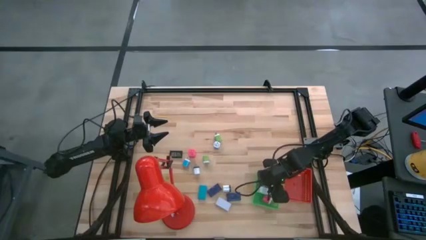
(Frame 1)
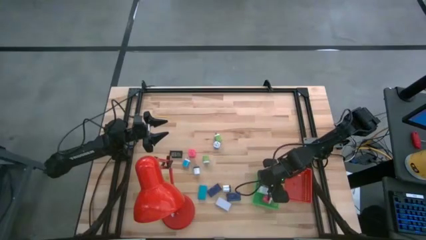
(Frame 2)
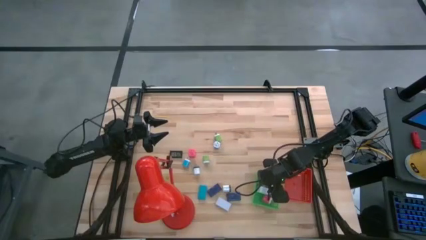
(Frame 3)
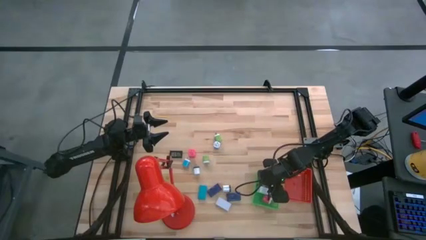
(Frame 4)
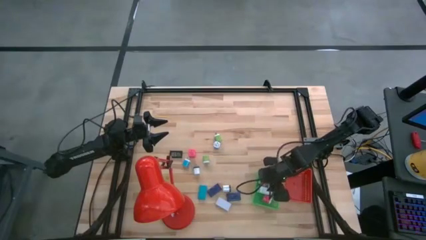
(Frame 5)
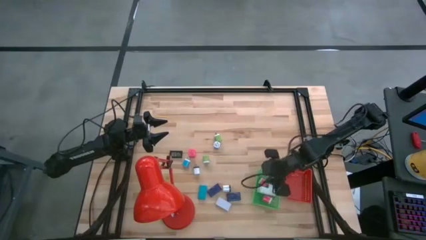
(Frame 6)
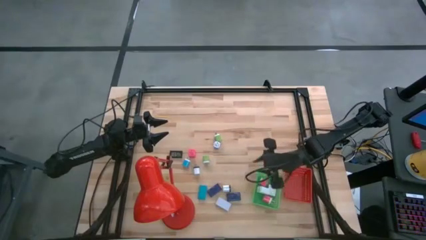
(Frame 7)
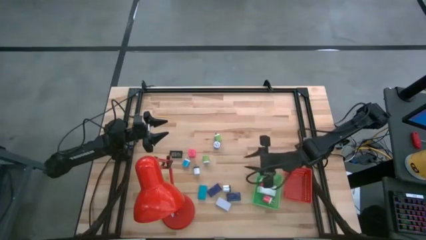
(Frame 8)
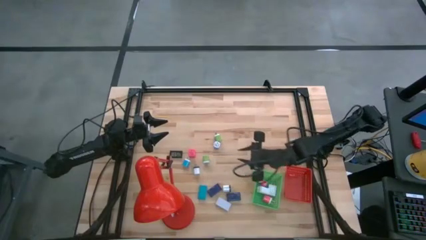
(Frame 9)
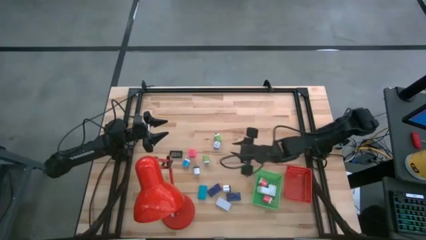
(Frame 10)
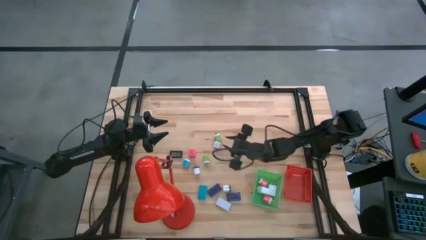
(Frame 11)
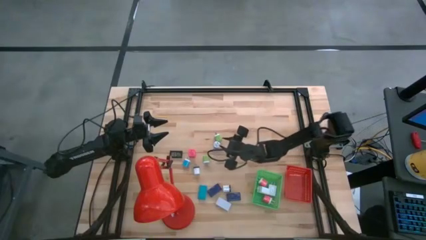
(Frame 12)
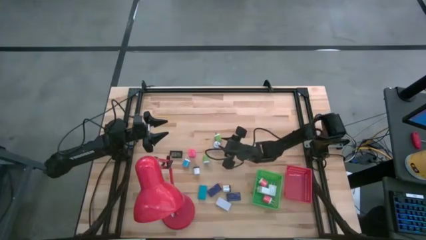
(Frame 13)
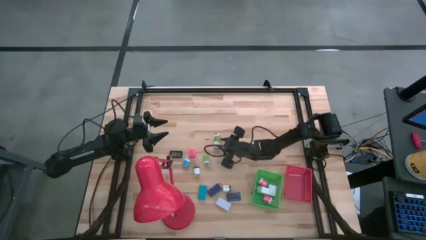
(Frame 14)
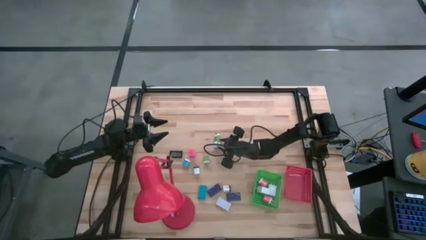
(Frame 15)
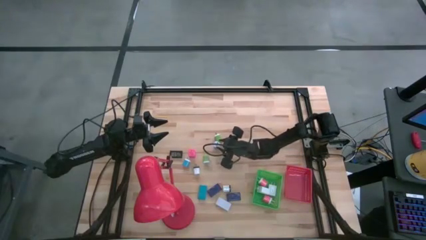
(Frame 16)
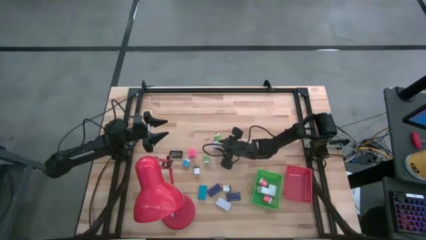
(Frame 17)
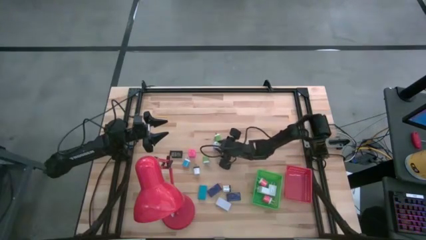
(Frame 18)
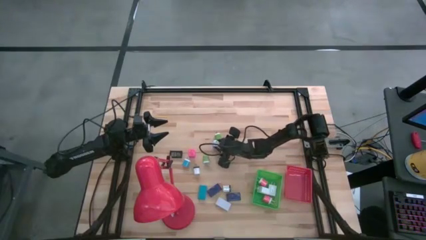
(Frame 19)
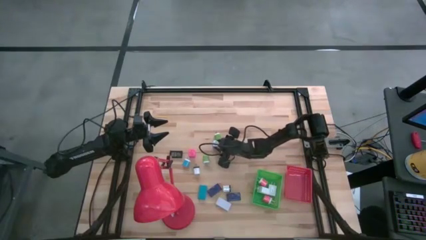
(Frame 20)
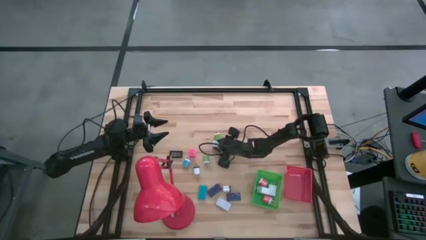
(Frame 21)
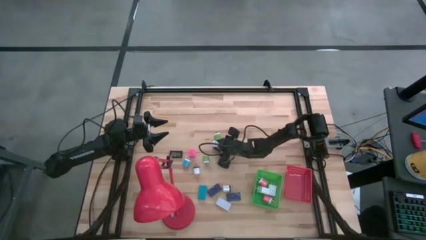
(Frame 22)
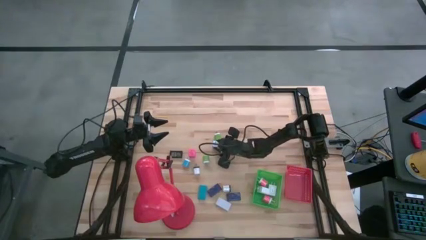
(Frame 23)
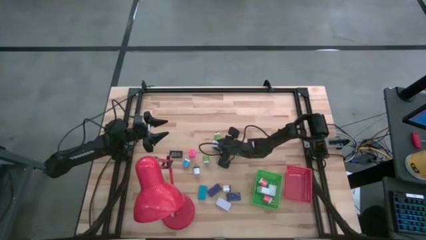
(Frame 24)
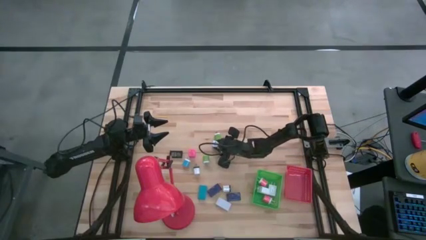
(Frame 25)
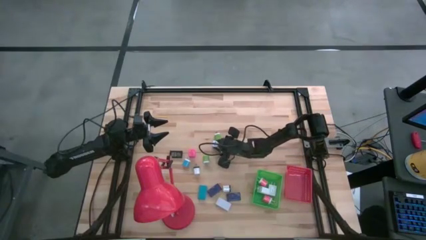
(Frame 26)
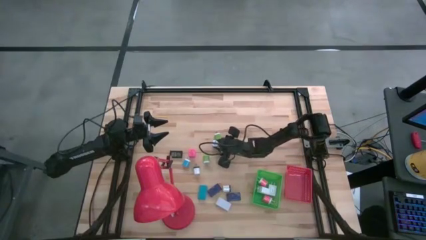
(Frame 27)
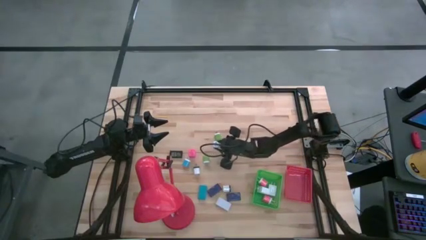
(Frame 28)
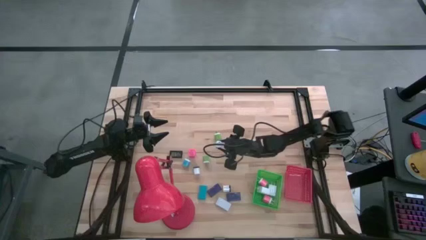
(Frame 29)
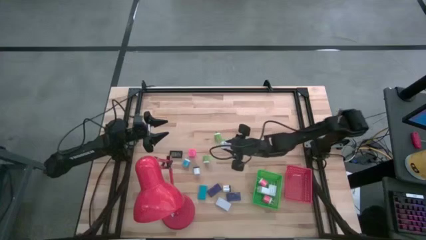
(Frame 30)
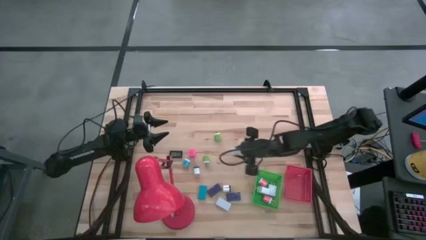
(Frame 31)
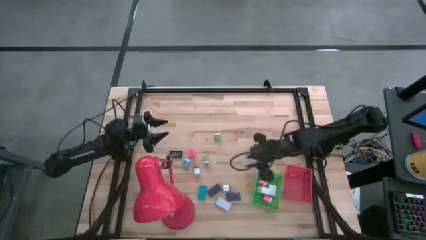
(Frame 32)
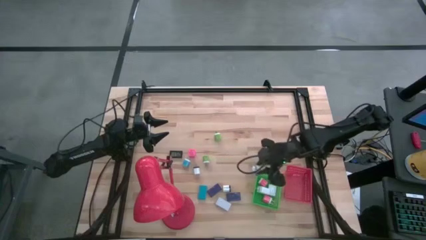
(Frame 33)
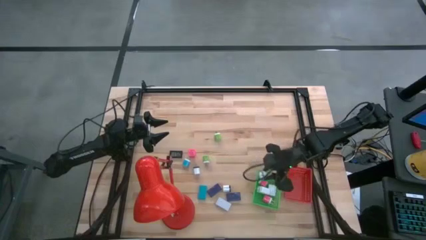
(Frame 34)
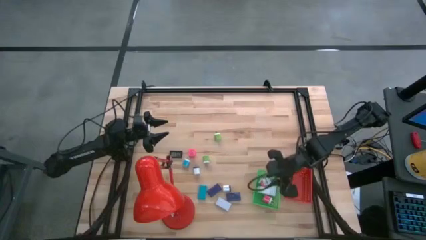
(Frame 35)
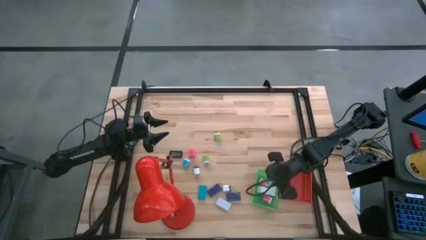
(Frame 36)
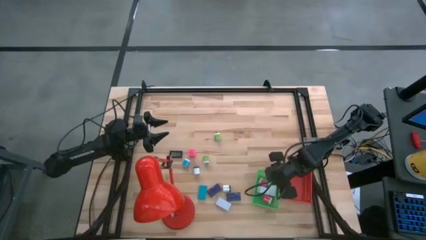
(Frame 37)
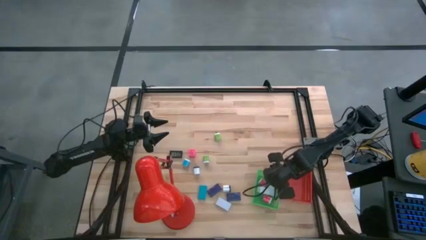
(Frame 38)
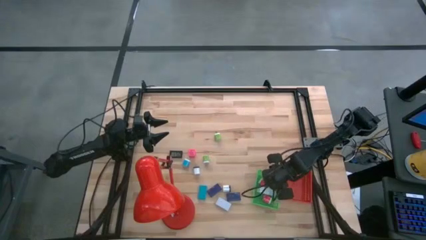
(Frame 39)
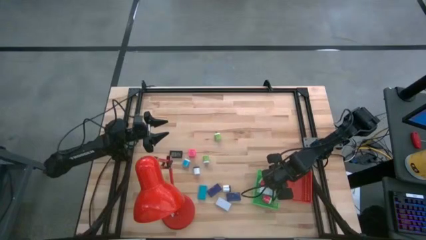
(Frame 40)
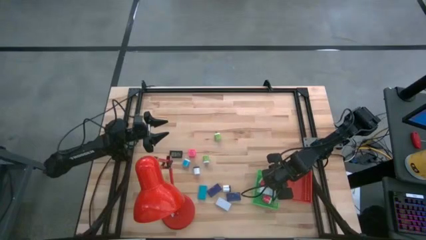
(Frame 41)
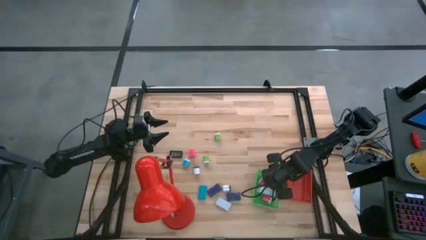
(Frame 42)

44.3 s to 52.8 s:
Task: Pick & Place Office items
Put the purple charger adapter into the green basket

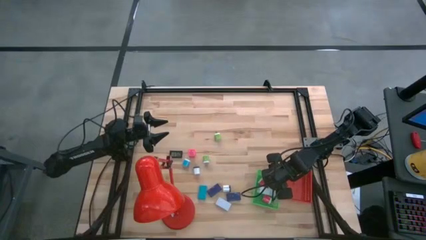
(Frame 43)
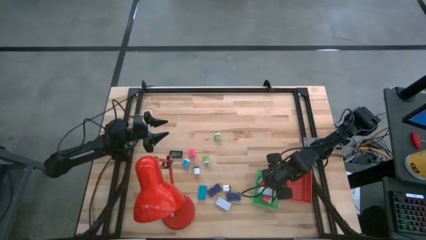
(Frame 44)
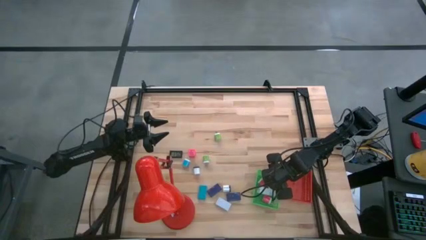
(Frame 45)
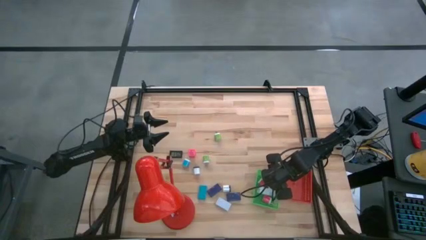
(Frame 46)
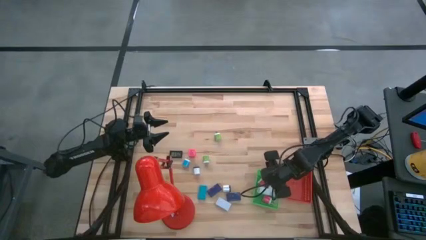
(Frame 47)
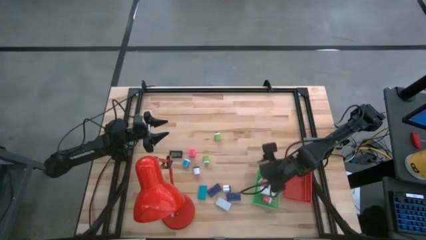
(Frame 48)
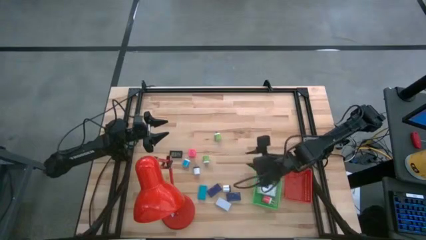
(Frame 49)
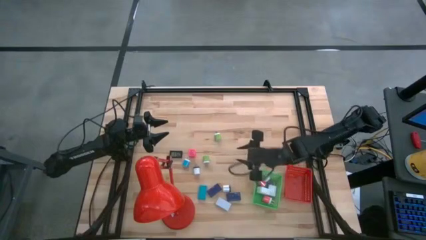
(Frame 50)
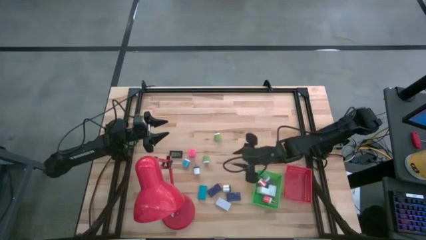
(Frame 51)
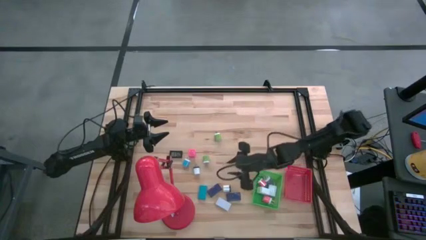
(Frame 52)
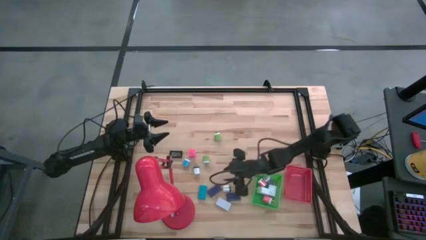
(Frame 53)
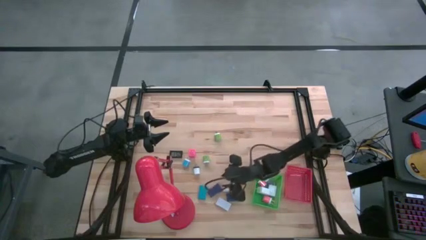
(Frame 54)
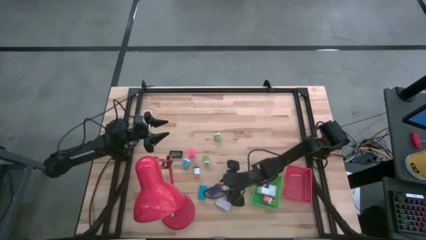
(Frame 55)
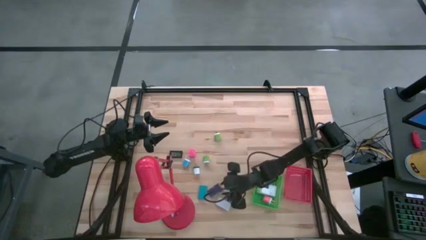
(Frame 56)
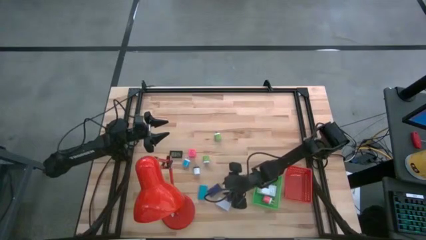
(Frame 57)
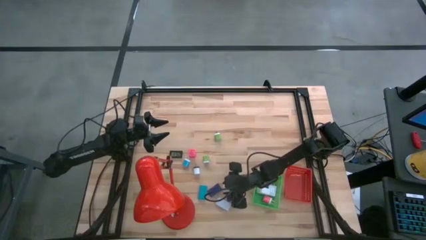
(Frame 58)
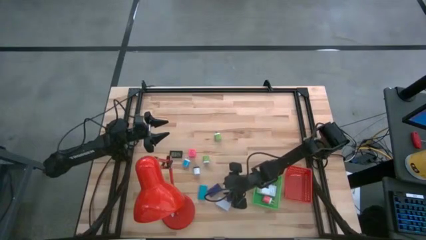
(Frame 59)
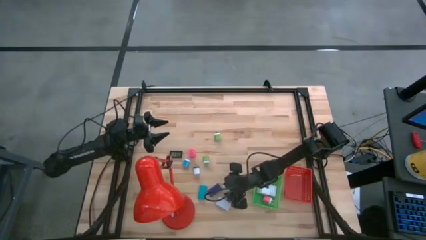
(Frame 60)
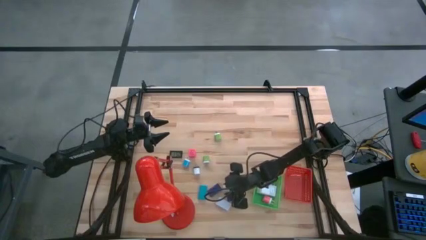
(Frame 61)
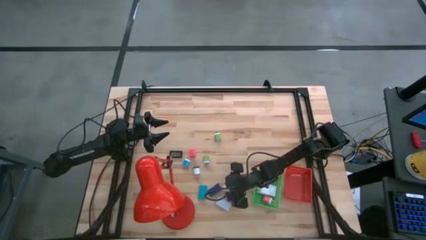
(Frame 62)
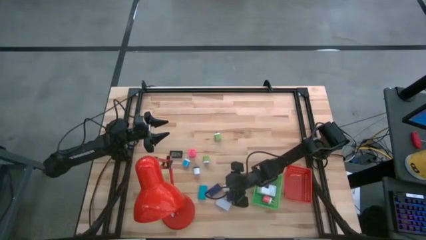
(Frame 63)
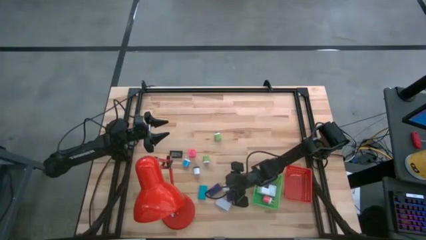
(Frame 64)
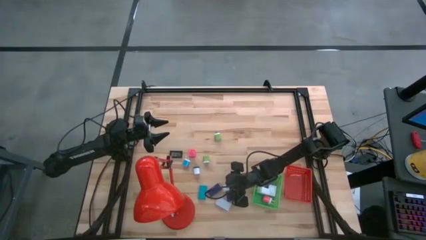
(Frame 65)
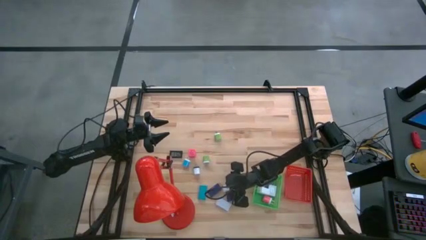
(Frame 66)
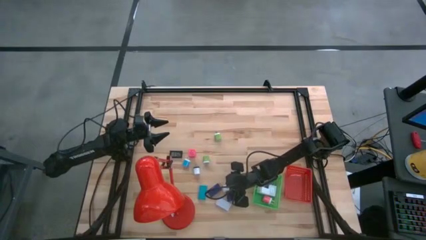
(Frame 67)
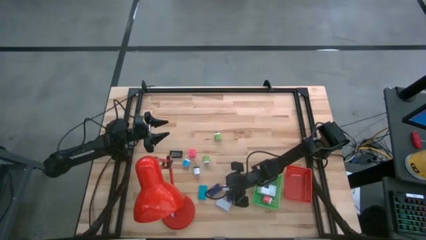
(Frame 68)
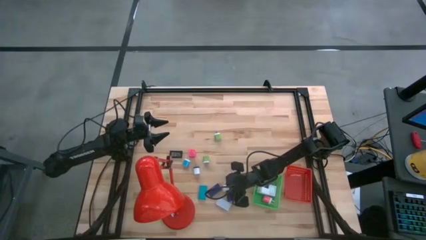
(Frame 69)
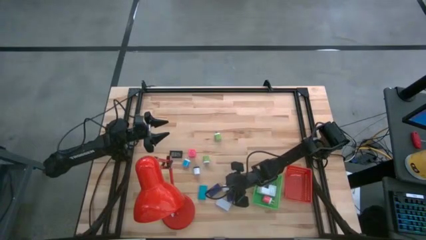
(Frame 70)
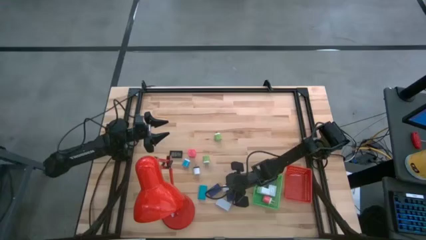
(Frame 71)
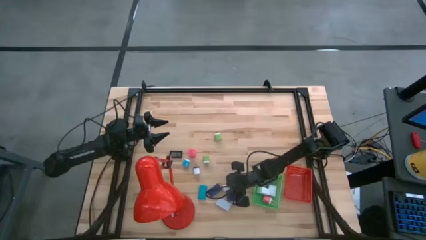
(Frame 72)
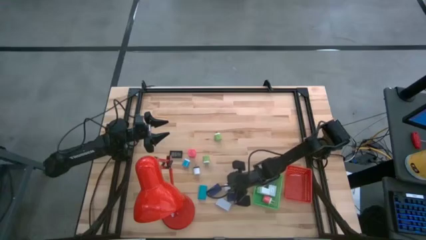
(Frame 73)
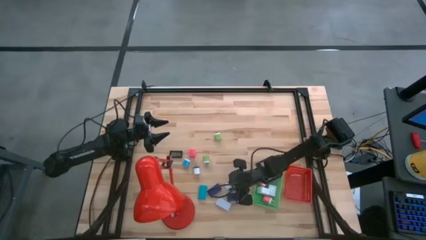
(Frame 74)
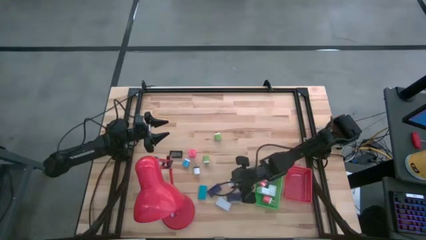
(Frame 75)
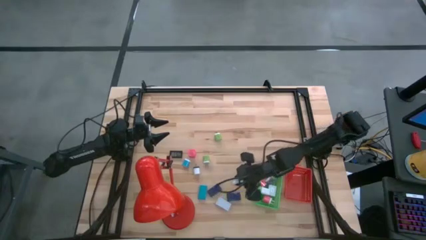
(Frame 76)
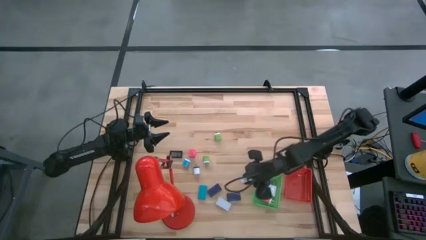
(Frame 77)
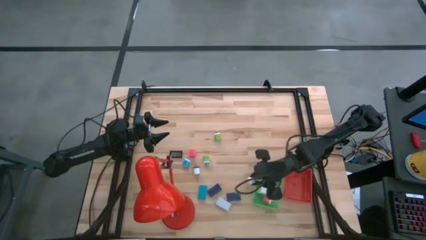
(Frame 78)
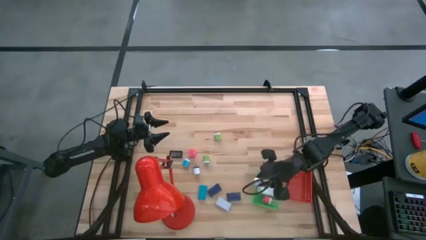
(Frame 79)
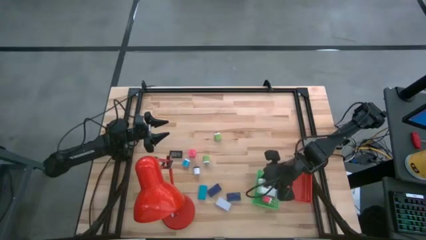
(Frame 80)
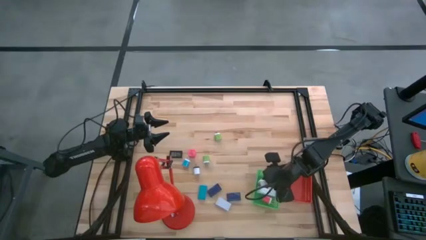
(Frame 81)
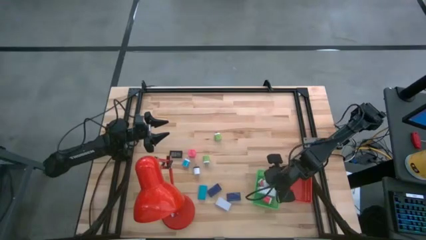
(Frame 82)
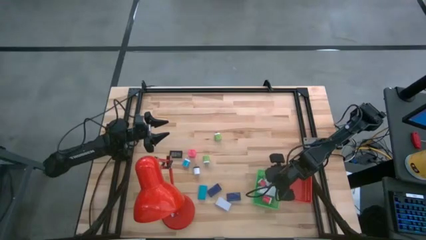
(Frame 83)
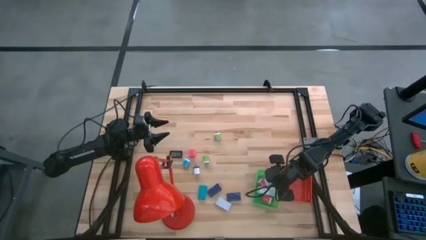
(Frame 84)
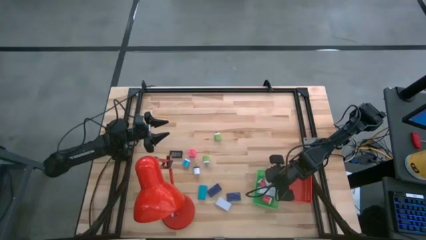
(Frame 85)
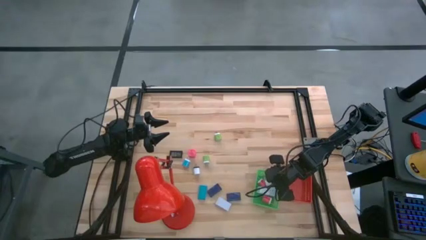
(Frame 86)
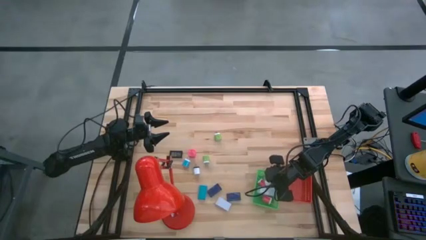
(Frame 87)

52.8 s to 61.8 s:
Put the white charger adapter into the green basket
